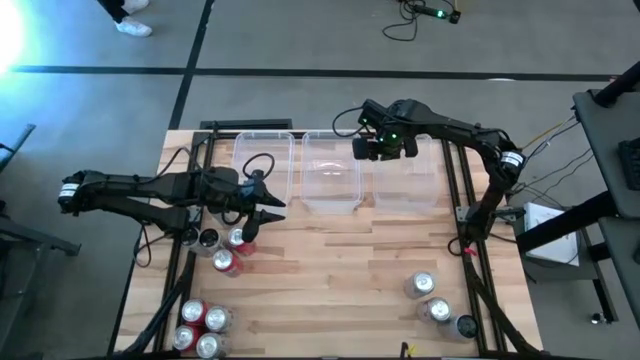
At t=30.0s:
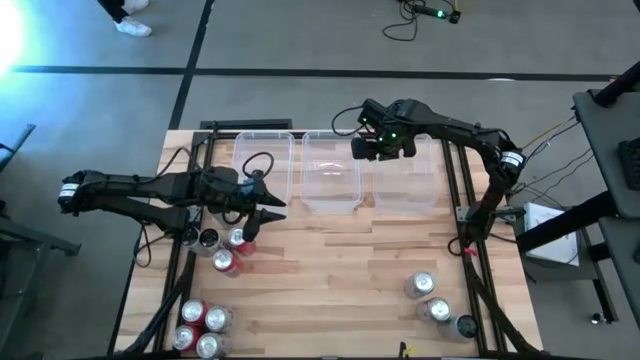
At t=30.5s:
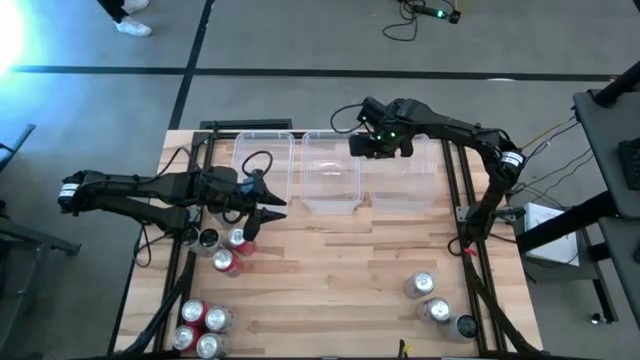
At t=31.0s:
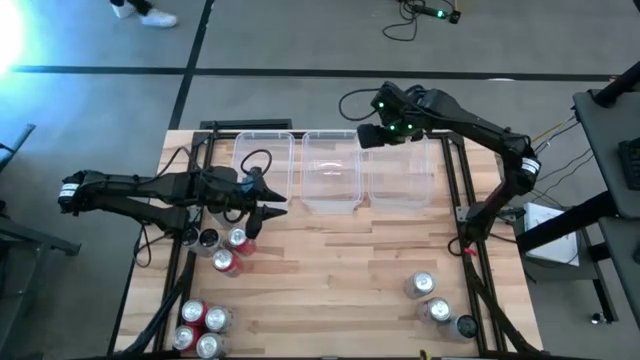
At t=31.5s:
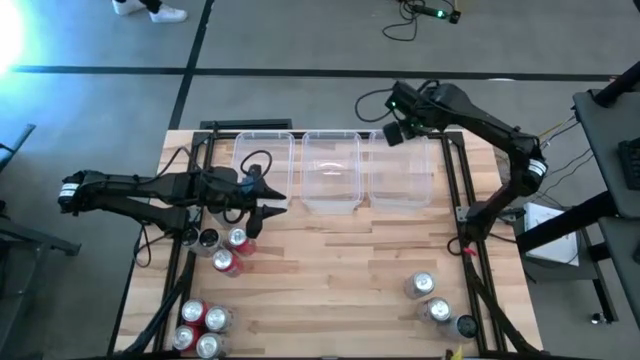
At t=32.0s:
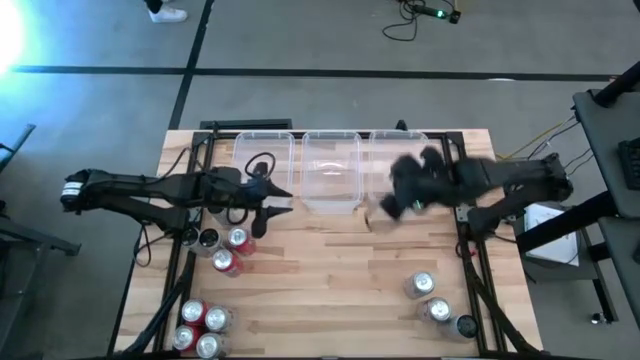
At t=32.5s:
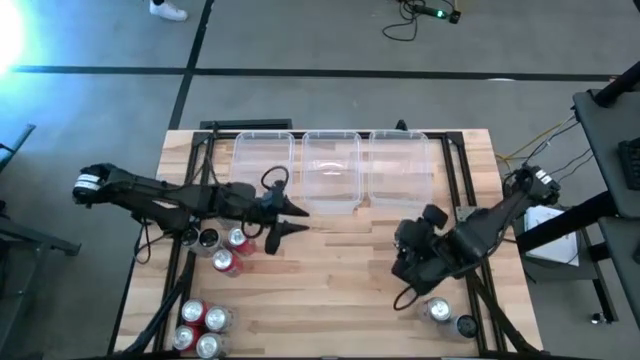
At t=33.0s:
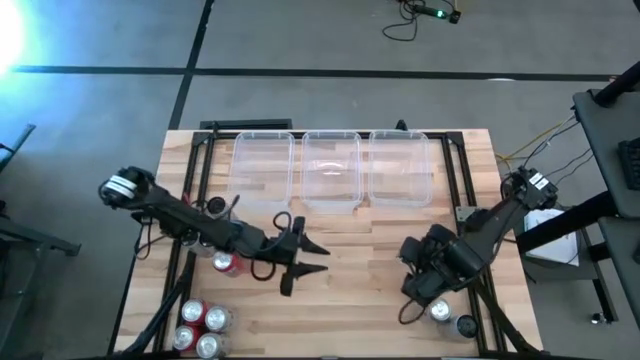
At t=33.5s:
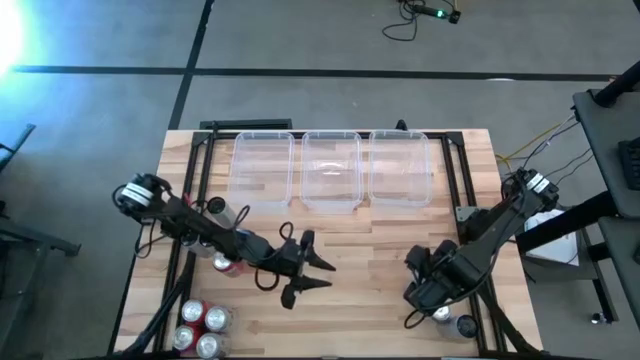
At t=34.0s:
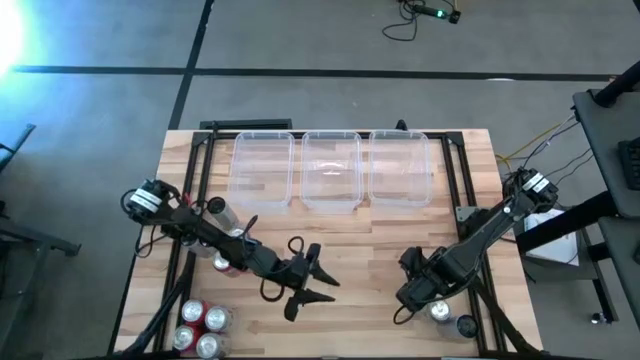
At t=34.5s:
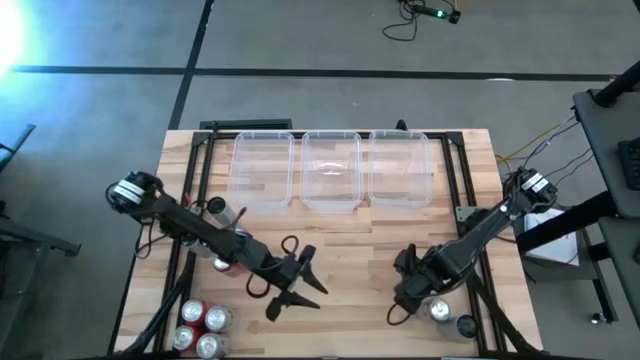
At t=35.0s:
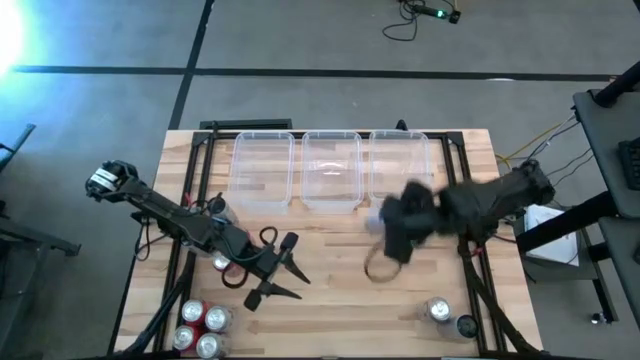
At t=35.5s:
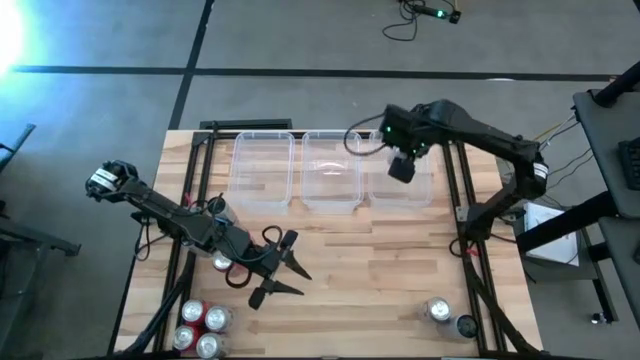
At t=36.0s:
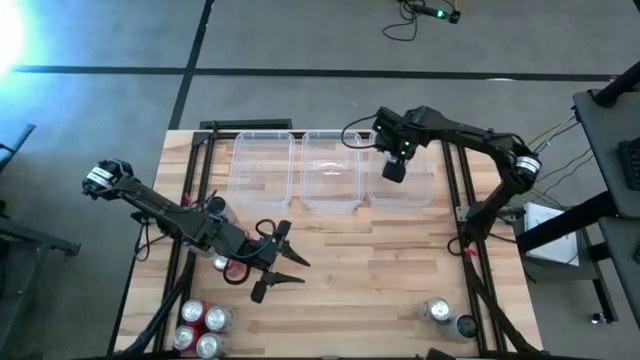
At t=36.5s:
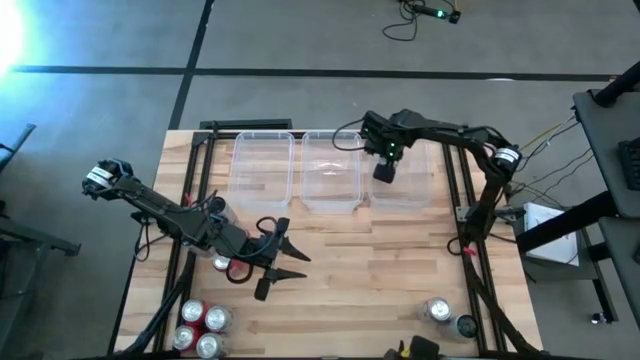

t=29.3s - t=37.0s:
Task: Sort soda cans
Put the red-silver soda can into the right transparent bin

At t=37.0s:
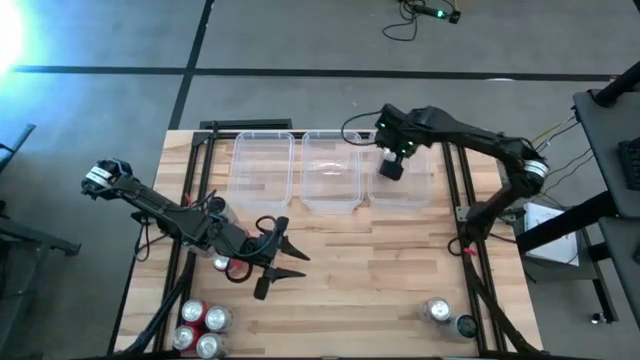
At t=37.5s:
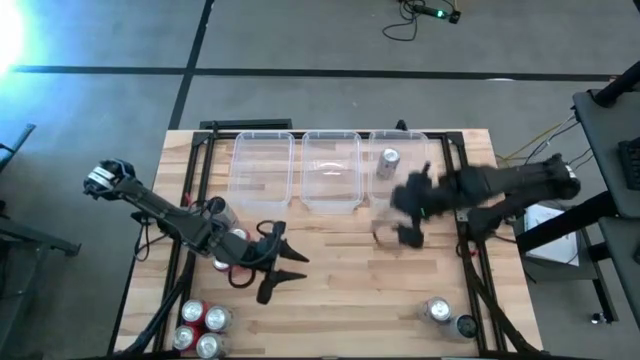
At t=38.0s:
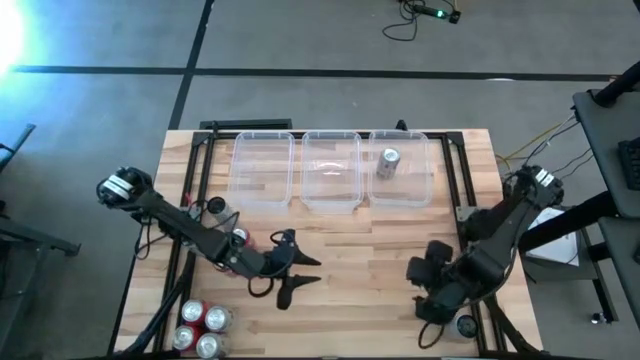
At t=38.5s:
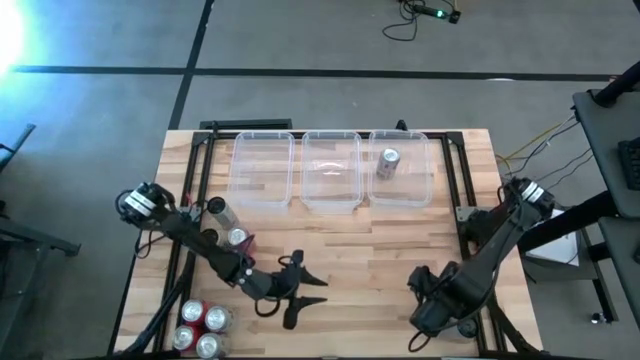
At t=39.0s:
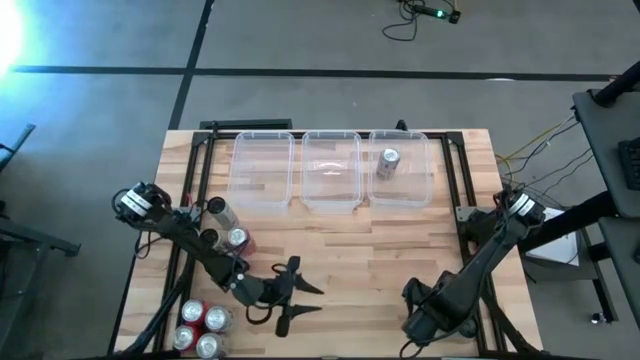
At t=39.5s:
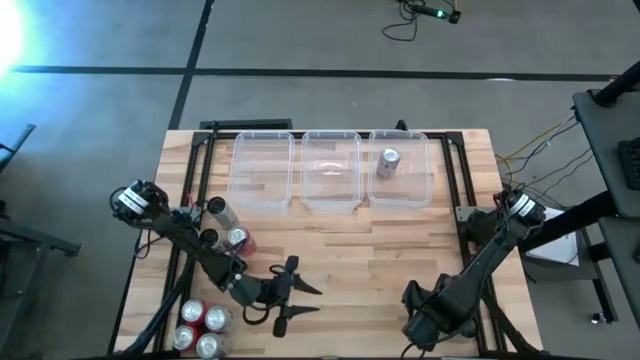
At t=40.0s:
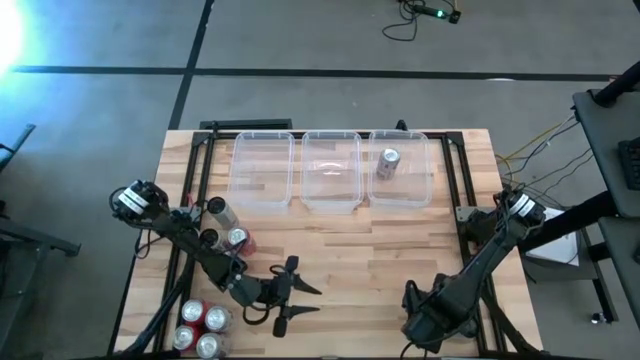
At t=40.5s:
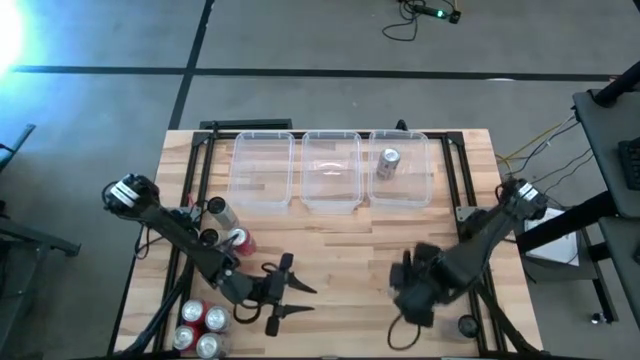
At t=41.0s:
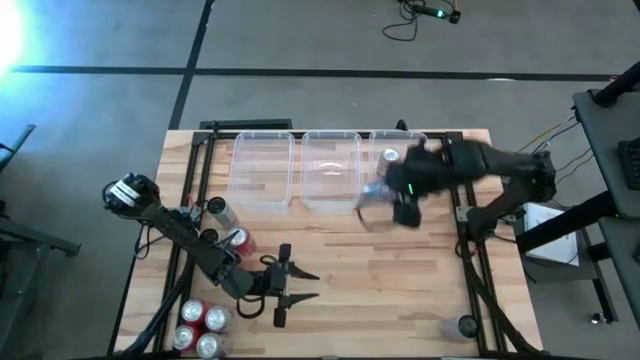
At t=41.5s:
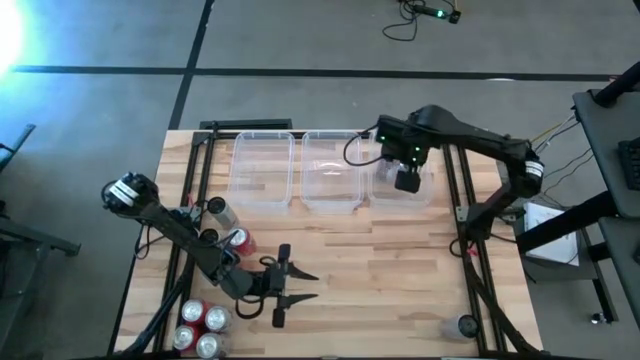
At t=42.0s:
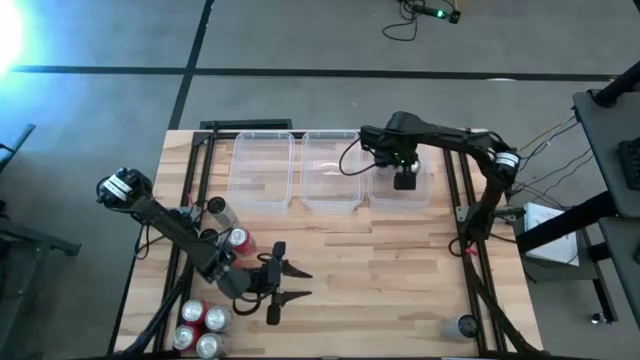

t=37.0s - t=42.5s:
Put the red-silver soda can into the right transparent bin

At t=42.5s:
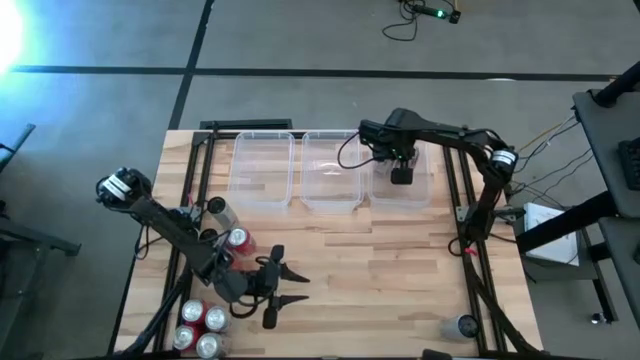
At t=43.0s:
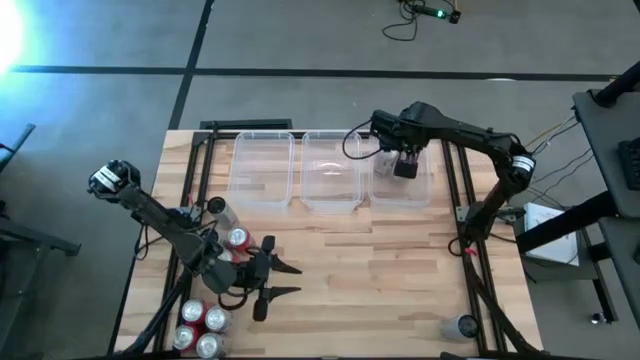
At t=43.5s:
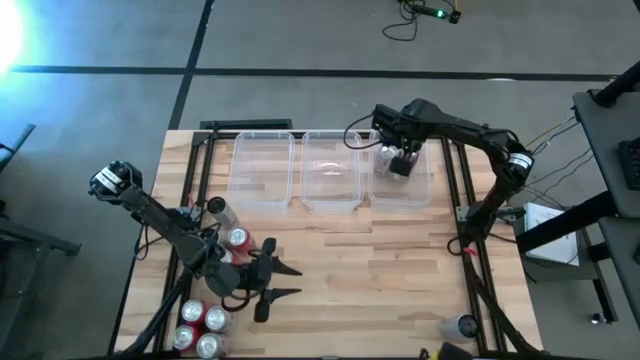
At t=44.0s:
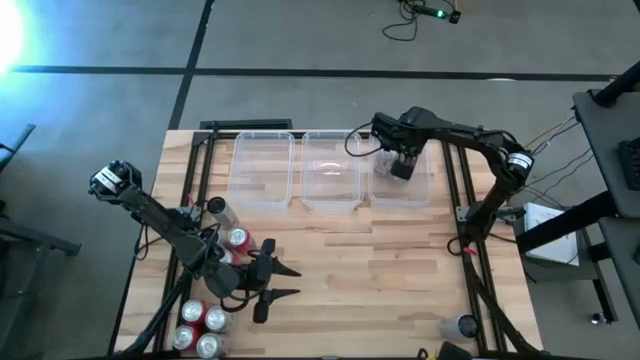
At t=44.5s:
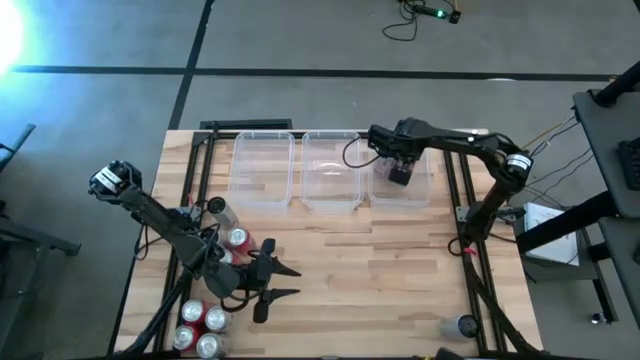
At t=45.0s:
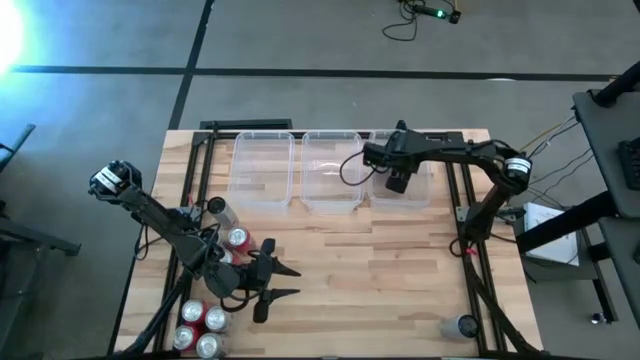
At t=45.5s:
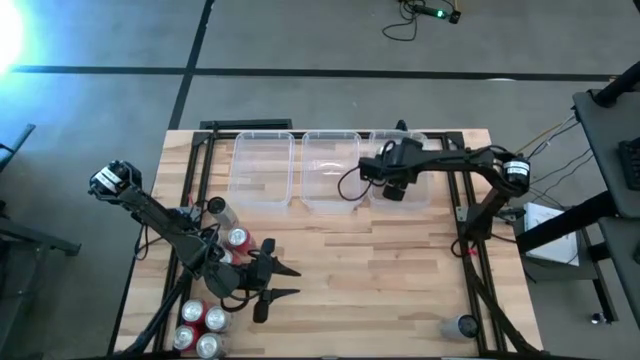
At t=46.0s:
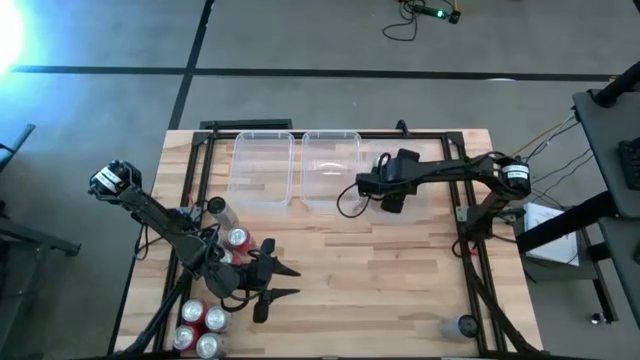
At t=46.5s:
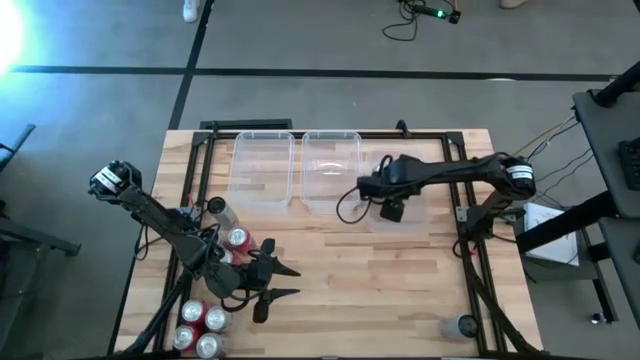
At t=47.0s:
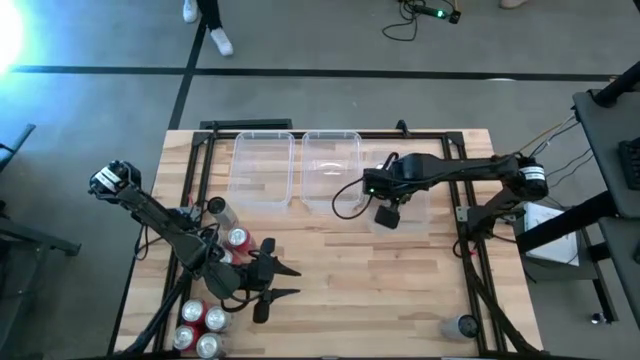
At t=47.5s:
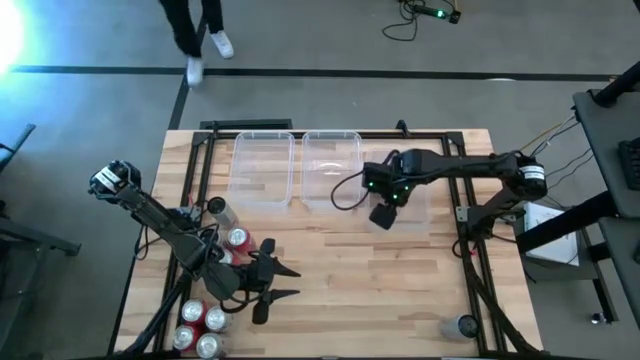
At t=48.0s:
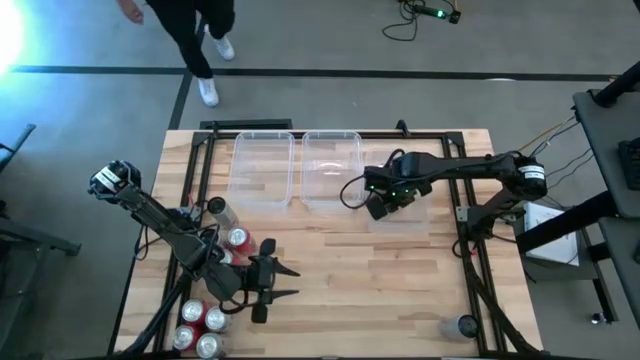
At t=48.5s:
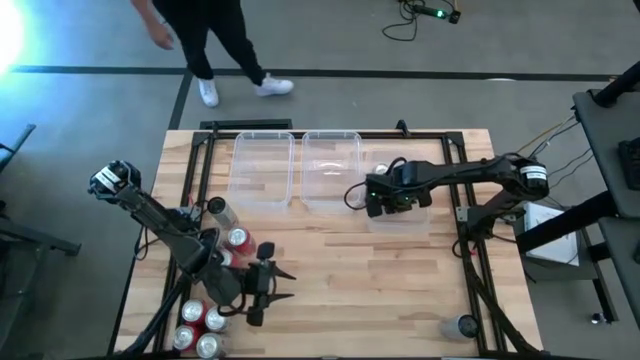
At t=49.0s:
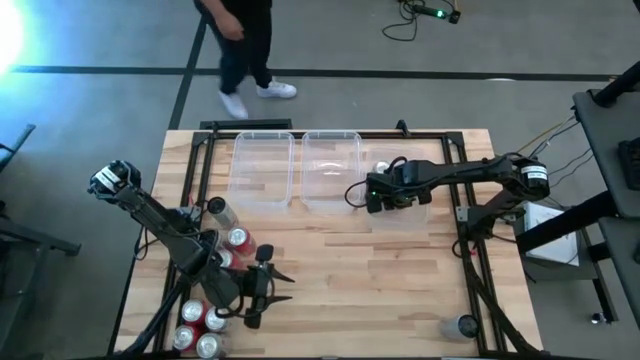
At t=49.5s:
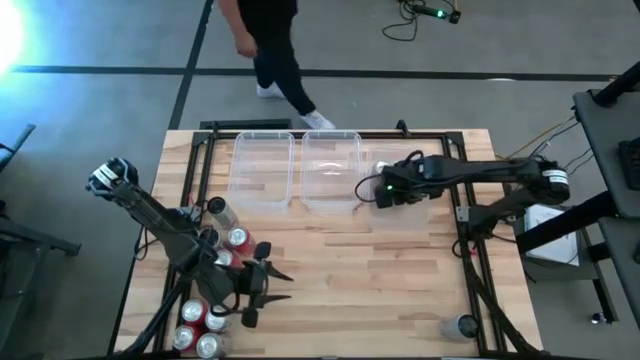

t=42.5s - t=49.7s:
Adjust the red-silver soda can in the right transparent bin

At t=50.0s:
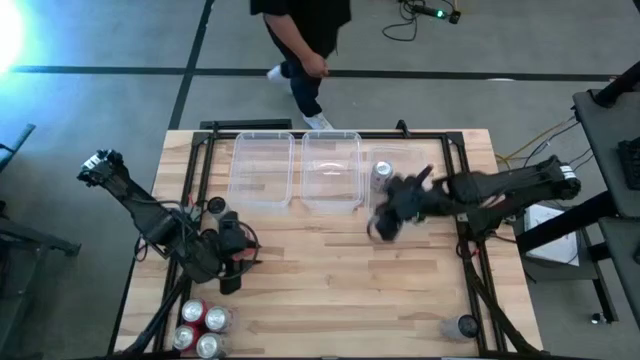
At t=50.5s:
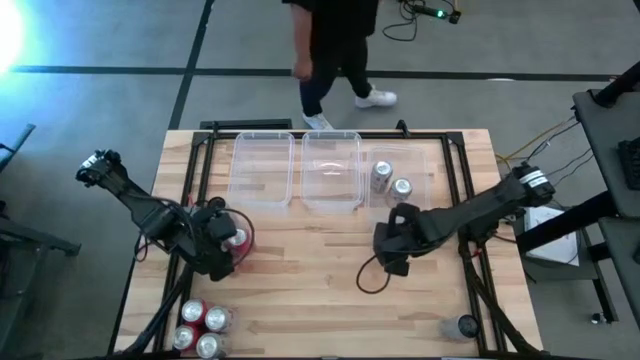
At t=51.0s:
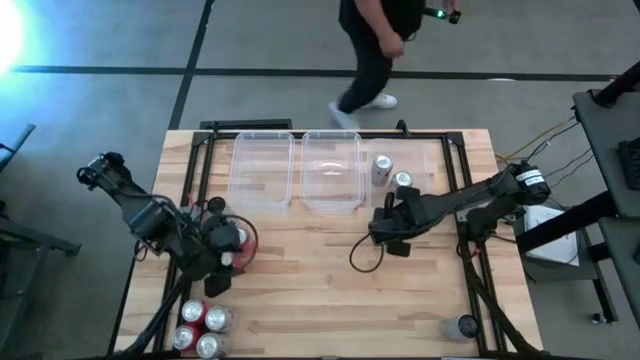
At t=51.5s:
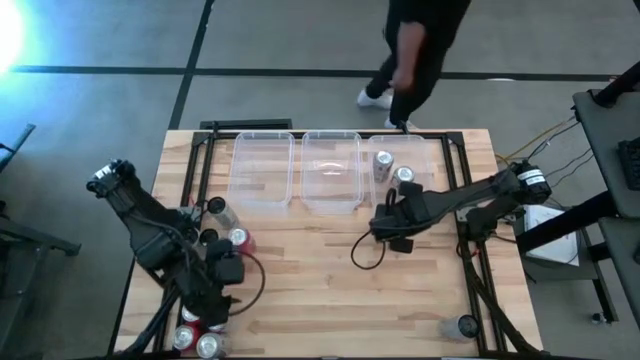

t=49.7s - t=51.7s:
Adjust the right transparent bin
